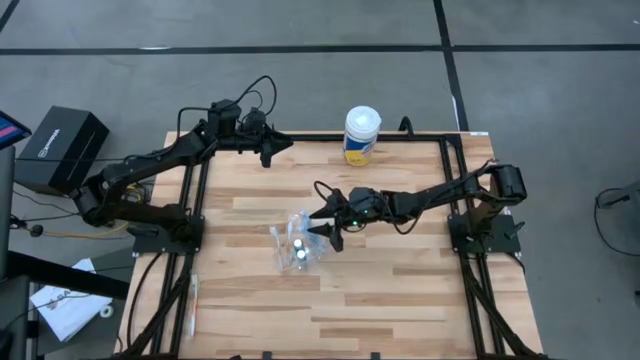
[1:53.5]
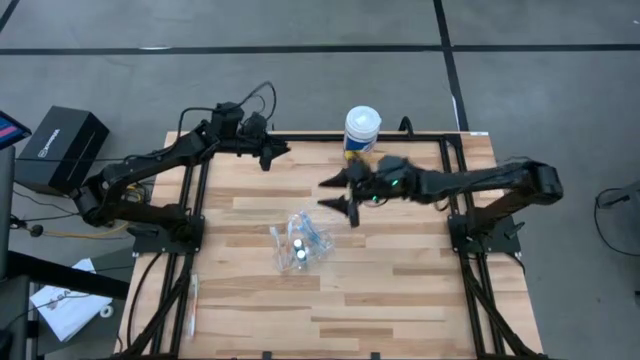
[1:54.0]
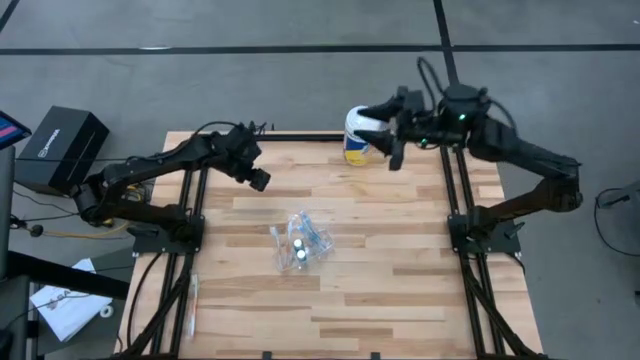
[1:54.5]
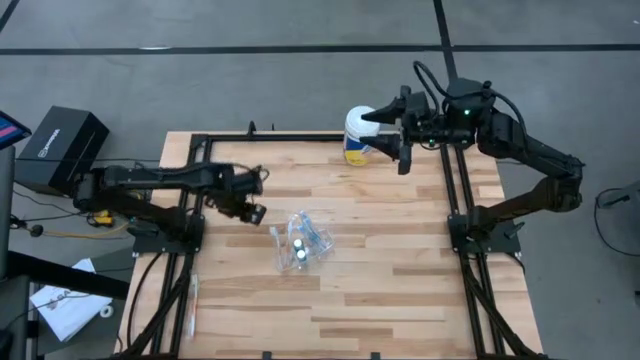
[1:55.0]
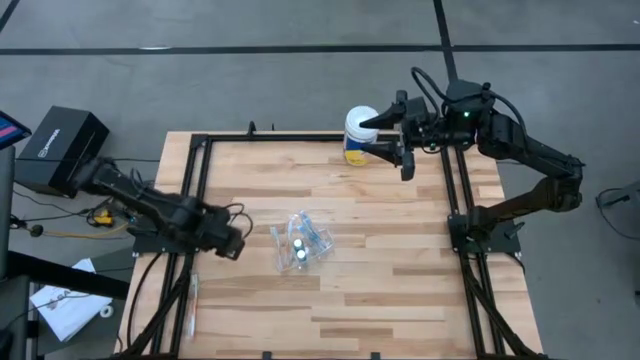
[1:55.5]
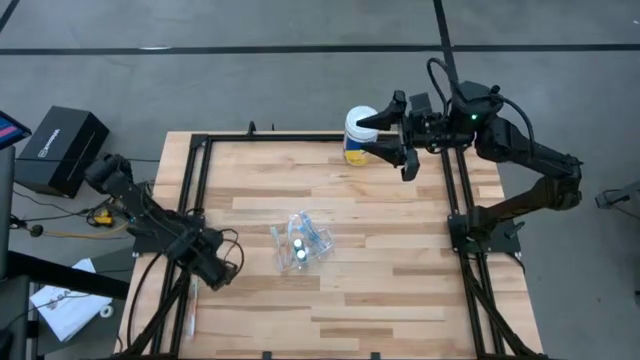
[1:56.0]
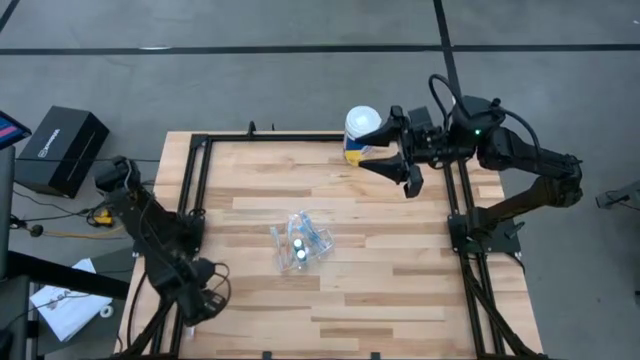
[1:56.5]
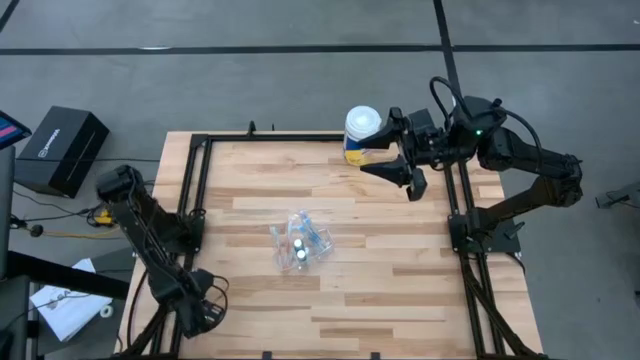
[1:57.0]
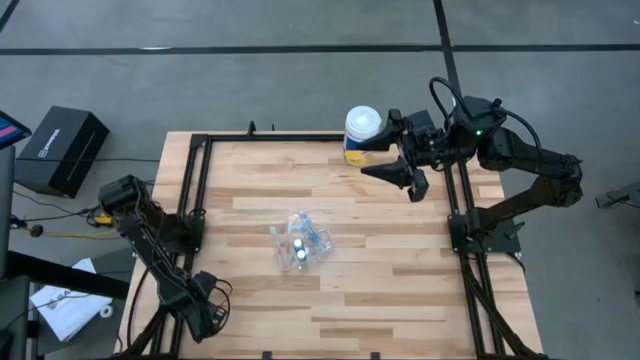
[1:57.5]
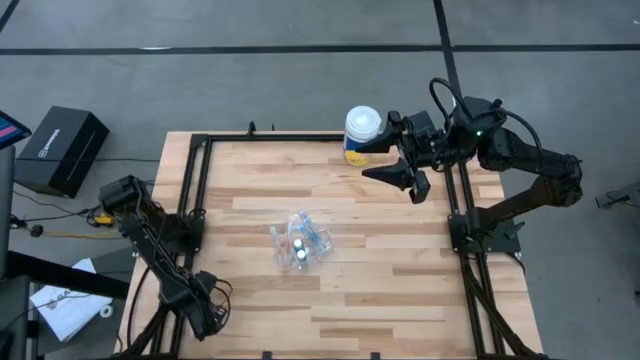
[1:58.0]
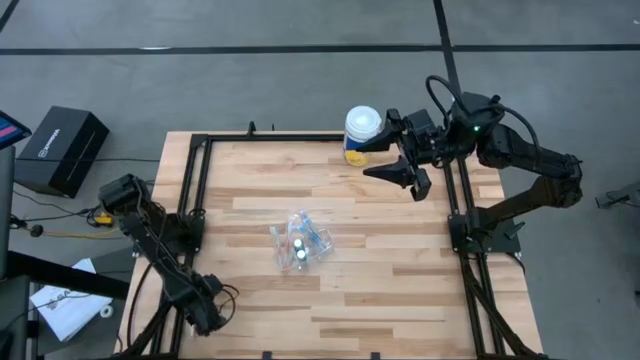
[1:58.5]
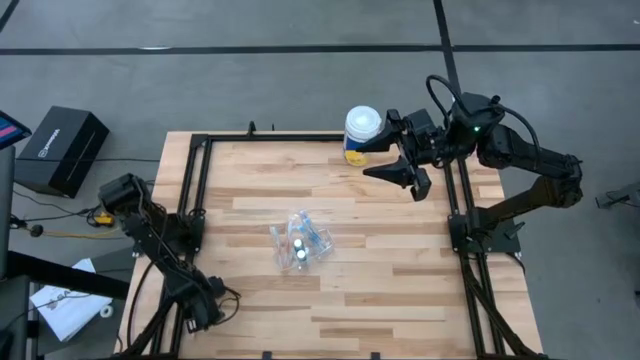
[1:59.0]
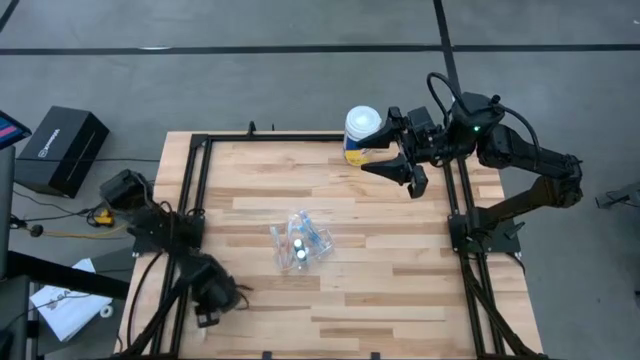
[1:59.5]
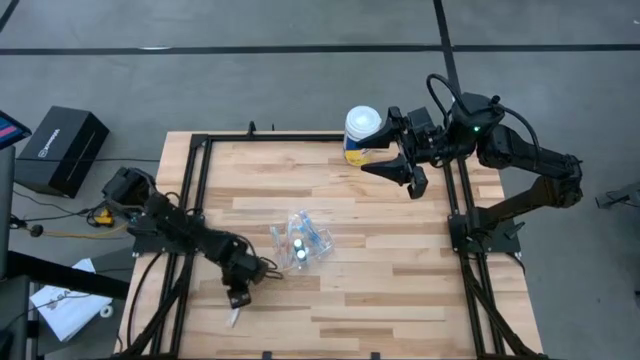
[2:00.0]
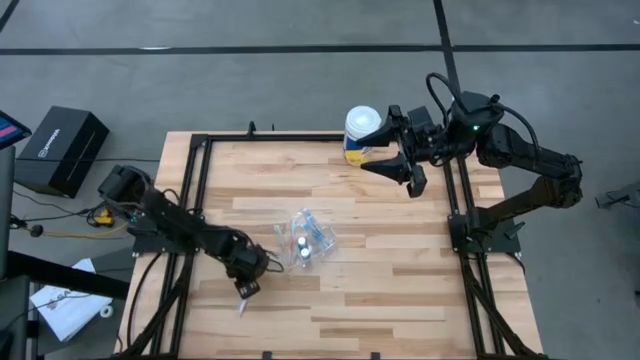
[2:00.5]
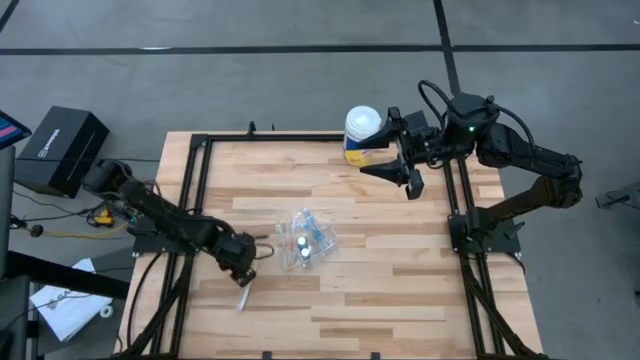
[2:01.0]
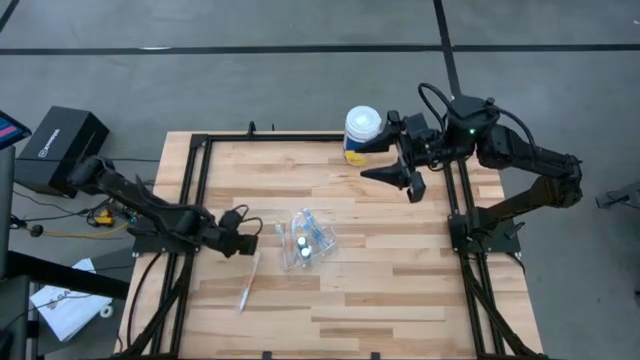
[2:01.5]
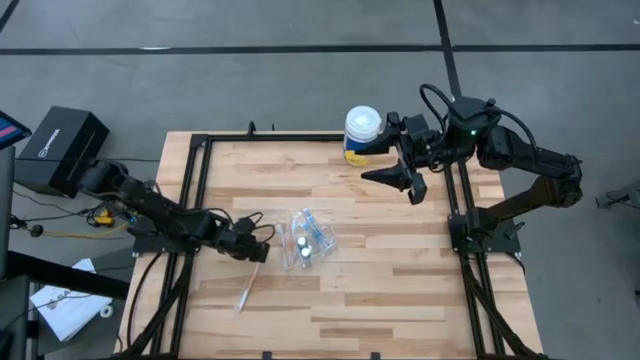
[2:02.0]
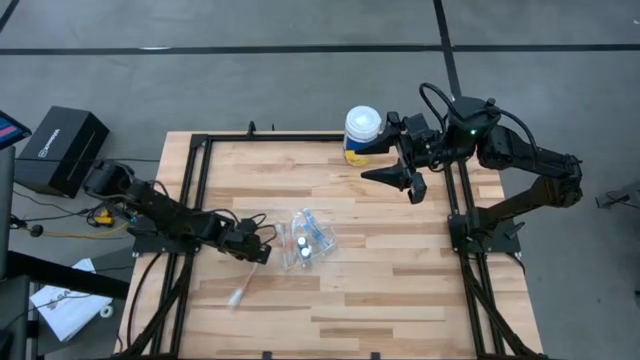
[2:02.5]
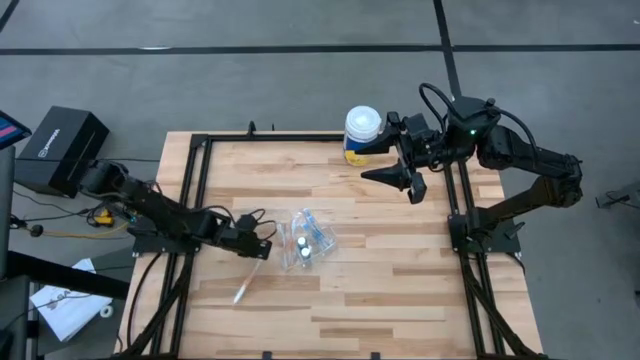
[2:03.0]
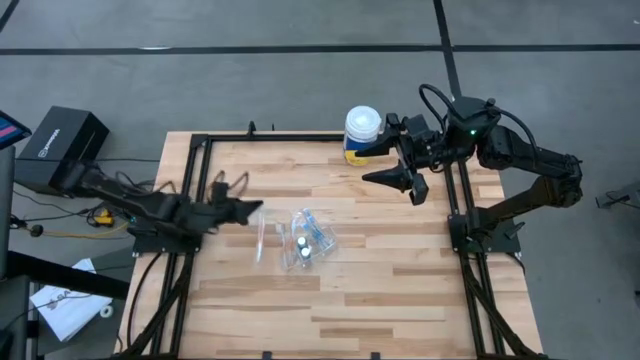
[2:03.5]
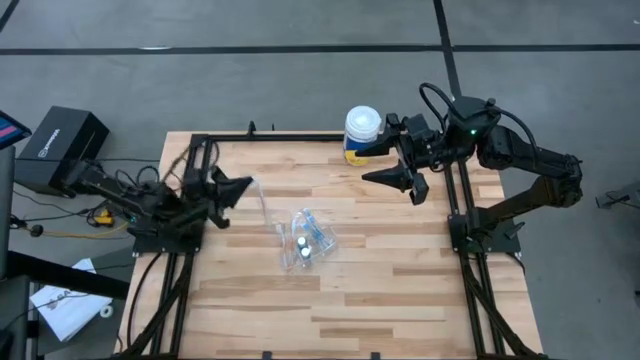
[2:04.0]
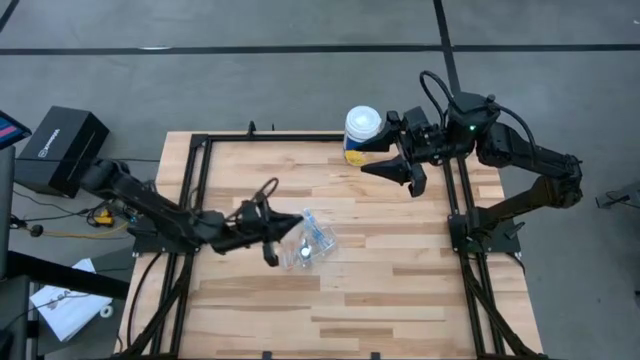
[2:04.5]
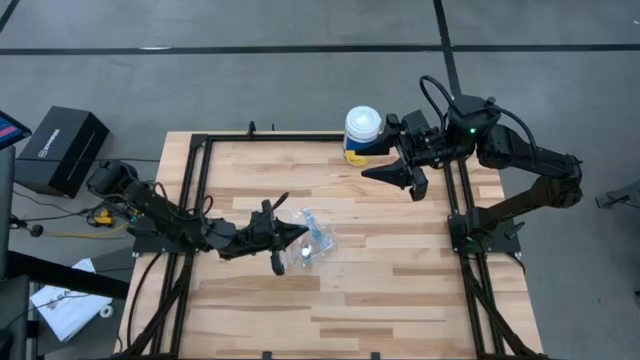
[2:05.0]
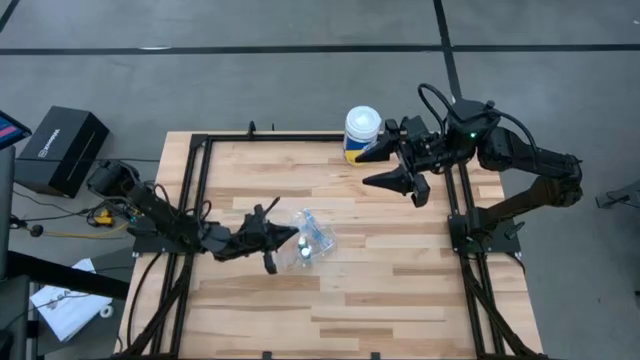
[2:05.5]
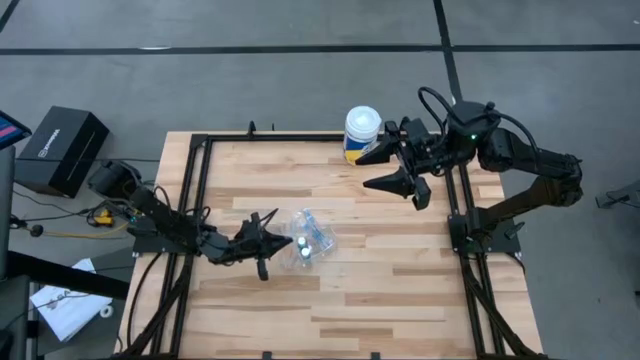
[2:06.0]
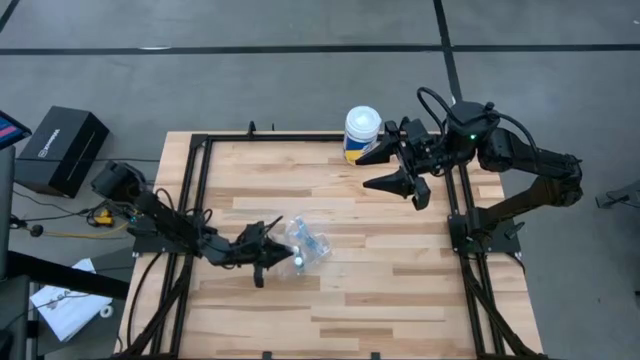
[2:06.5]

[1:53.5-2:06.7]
Task: Pick & Place toothbrushing station
Put the orange toothbrush into the transparent organizer

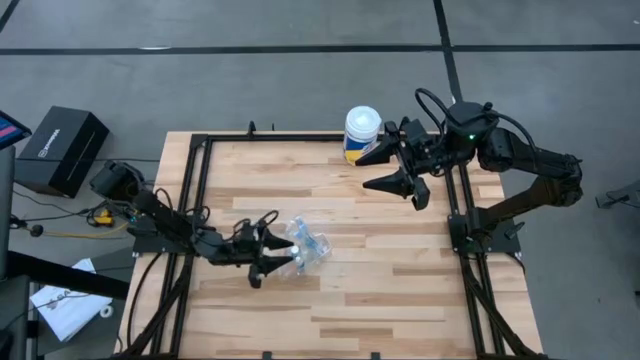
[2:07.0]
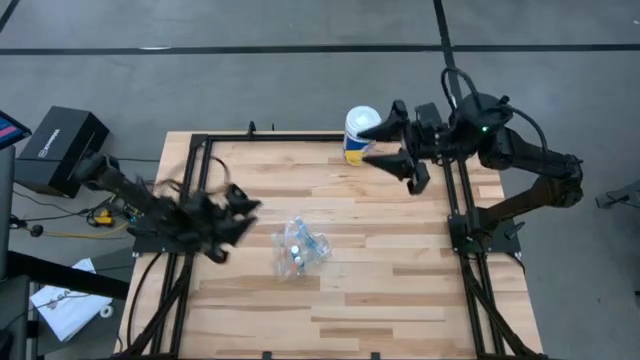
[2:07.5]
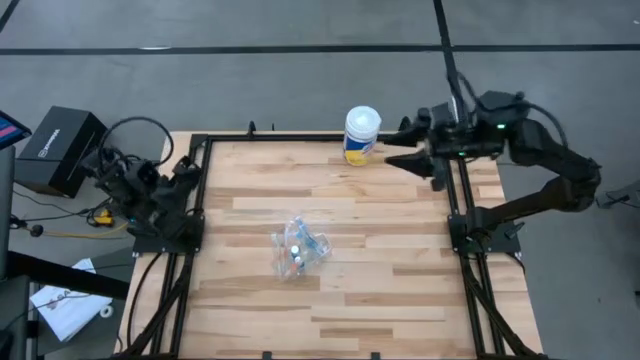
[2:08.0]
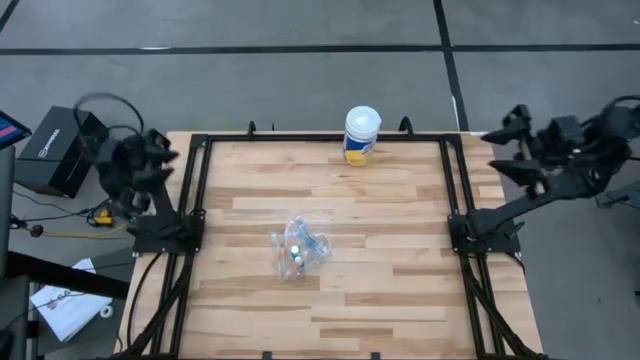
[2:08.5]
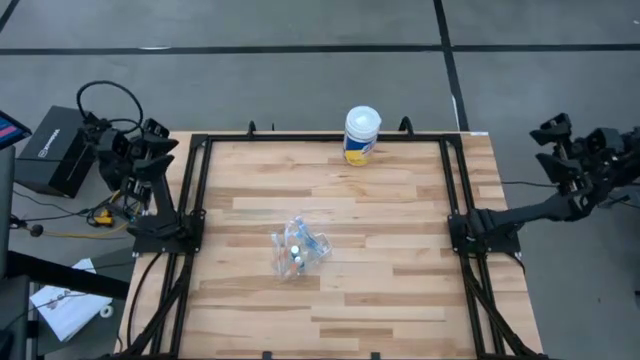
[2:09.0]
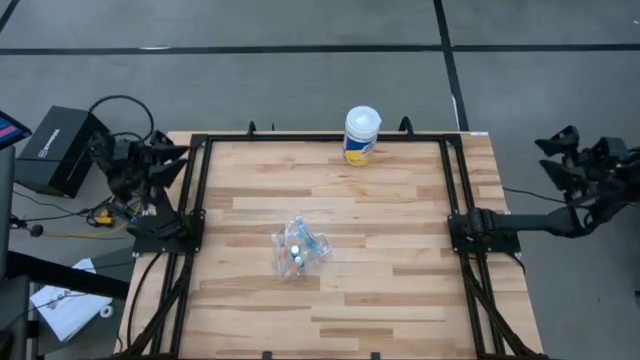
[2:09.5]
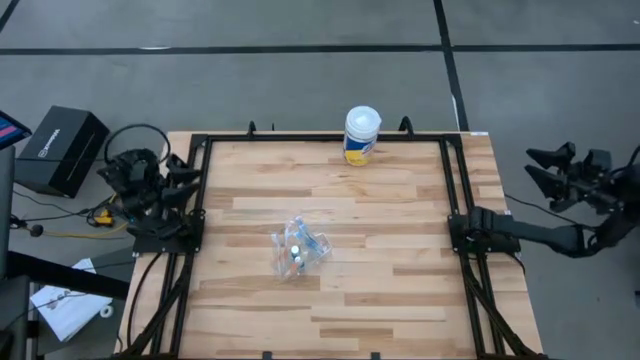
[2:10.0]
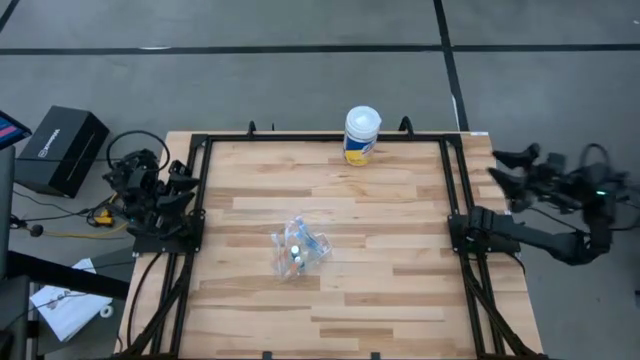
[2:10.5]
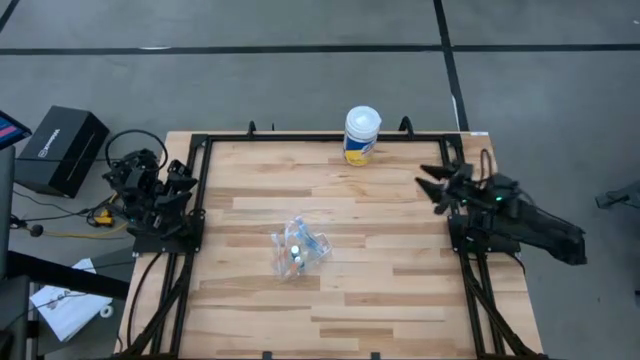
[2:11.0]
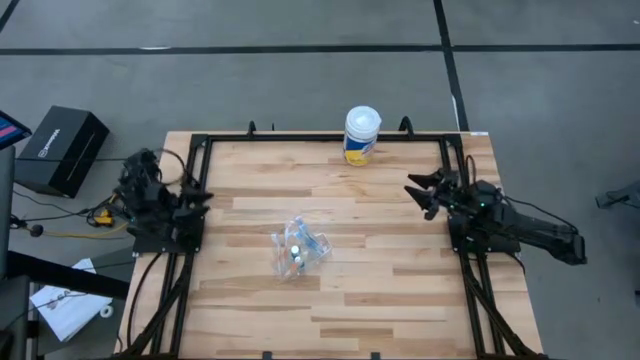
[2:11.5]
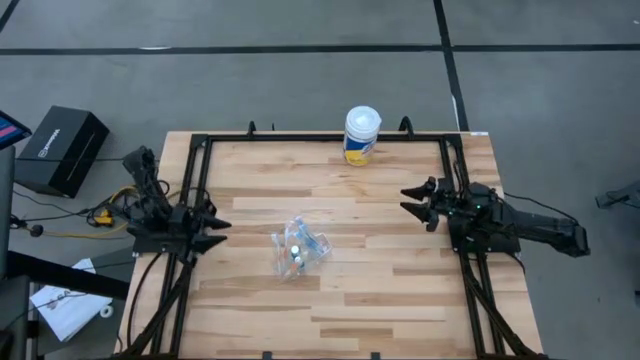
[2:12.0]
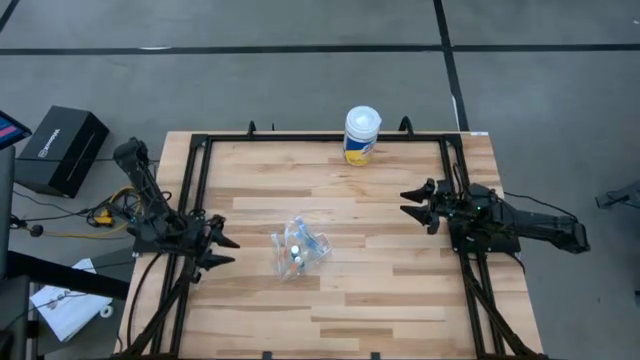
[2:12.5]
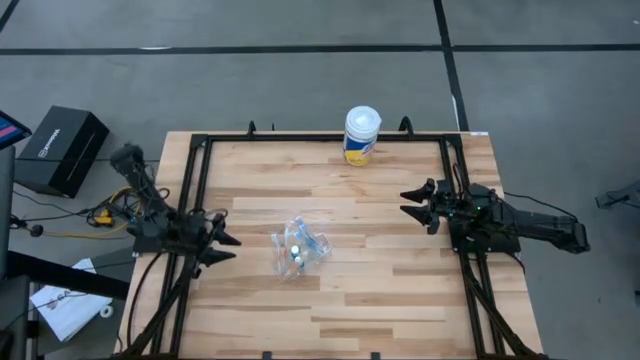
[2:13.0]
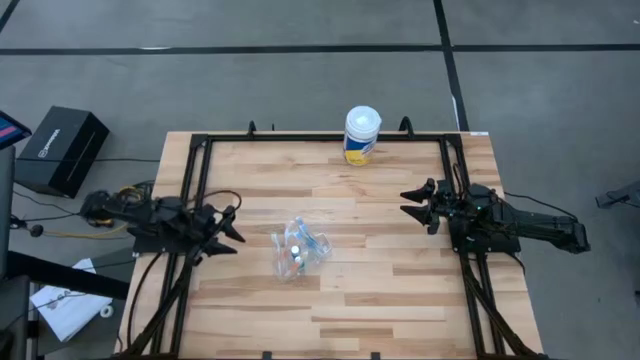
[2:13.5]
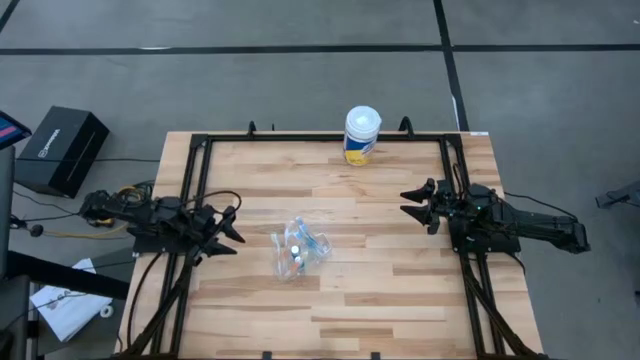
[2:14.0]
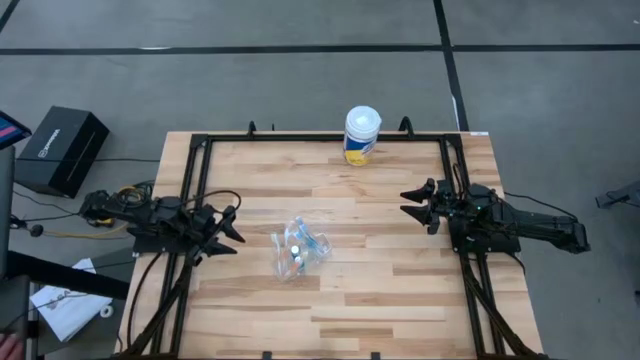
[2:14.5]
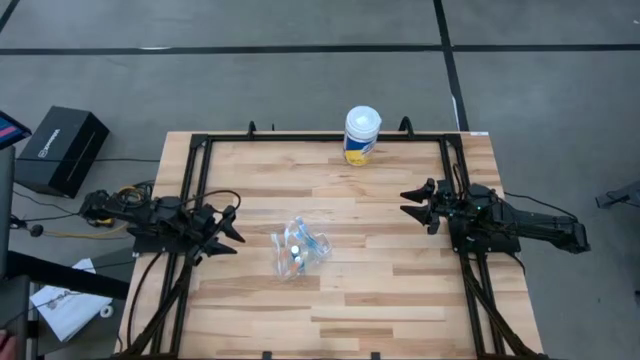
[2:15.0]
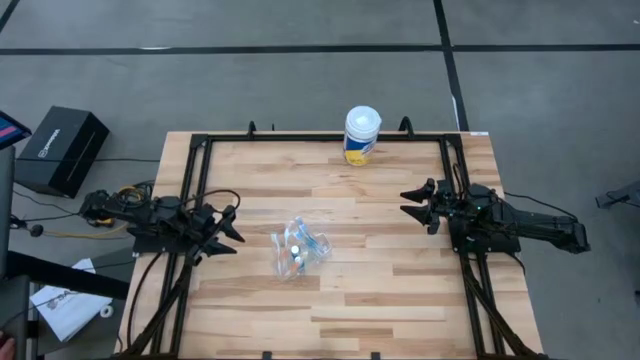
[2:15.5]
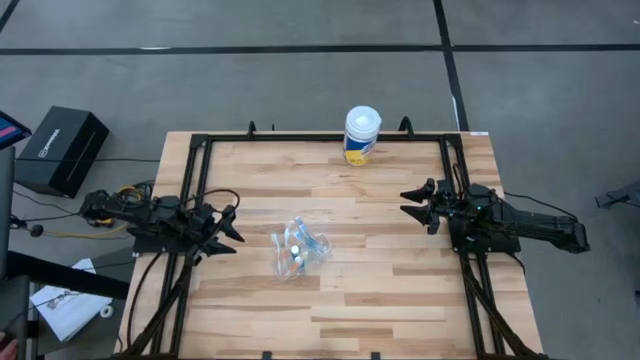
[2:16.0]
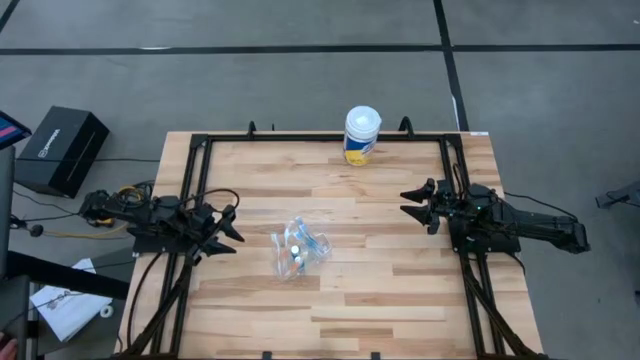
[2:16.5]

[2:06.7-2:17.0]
Return to Home Position
